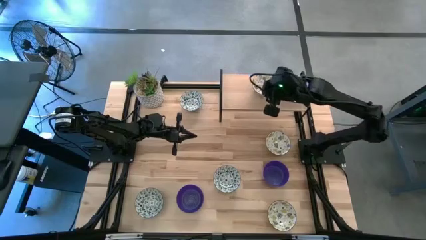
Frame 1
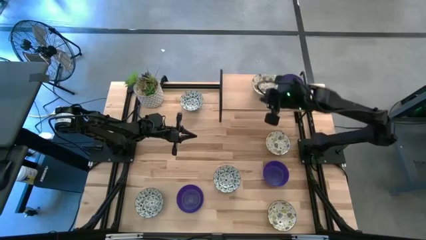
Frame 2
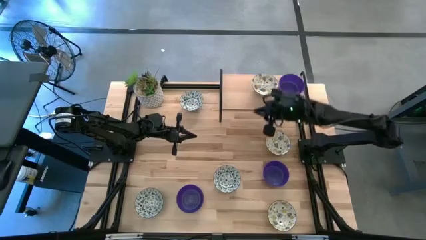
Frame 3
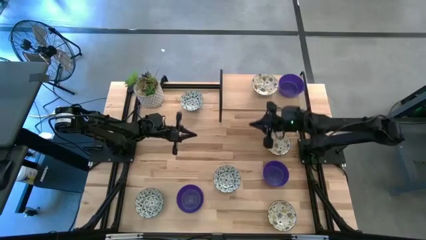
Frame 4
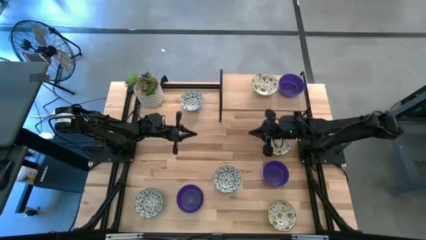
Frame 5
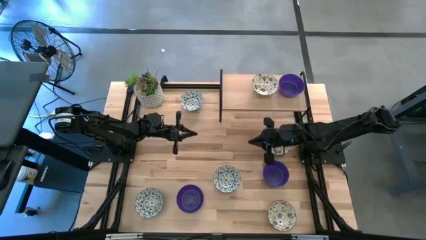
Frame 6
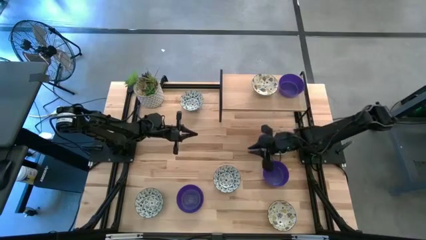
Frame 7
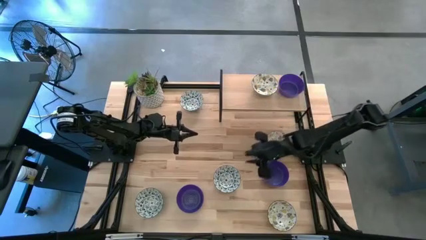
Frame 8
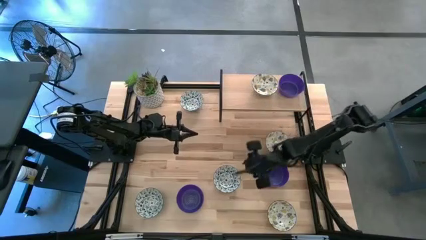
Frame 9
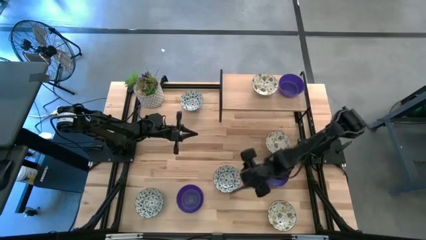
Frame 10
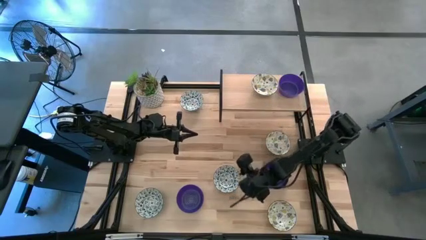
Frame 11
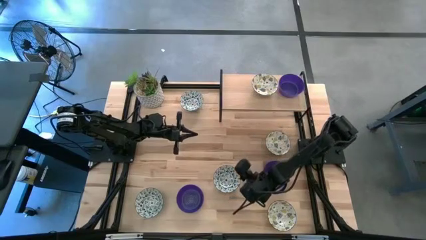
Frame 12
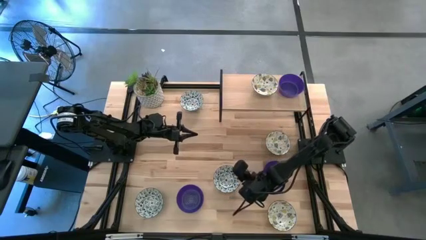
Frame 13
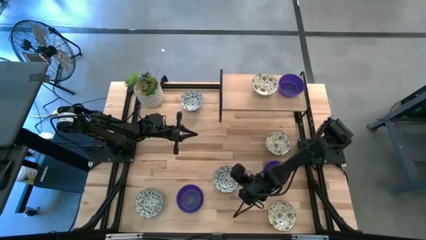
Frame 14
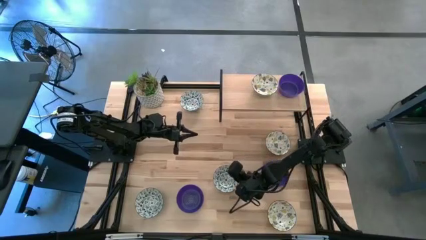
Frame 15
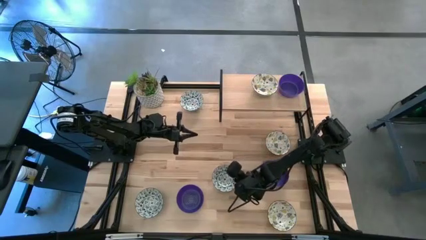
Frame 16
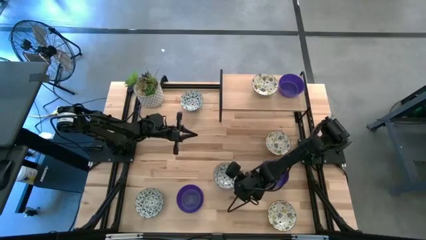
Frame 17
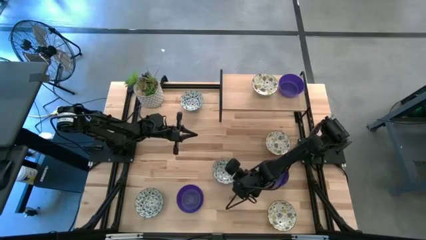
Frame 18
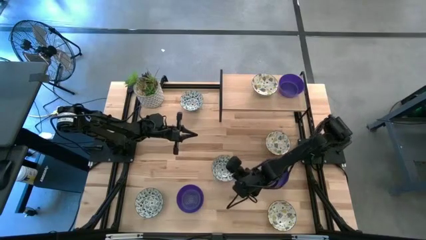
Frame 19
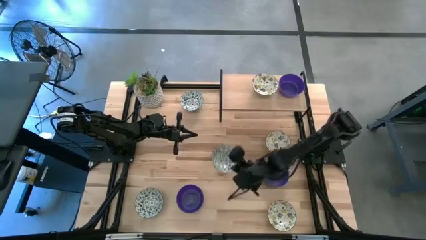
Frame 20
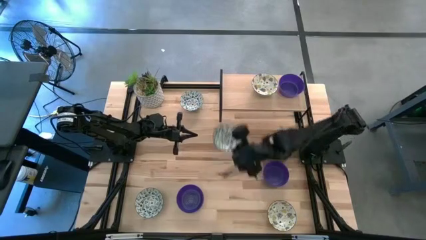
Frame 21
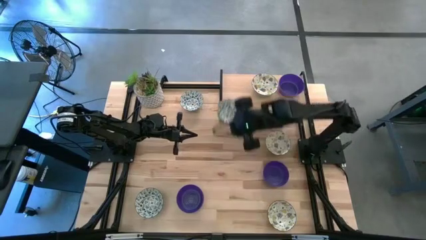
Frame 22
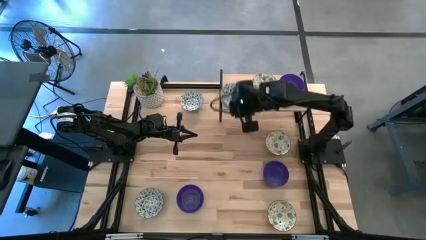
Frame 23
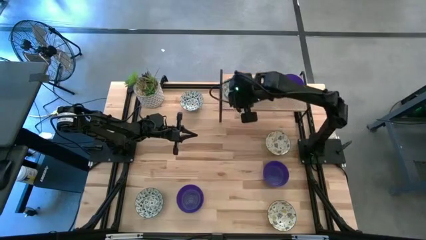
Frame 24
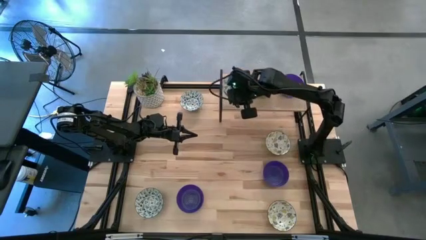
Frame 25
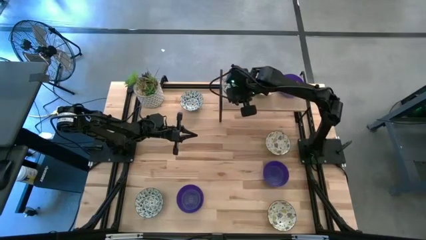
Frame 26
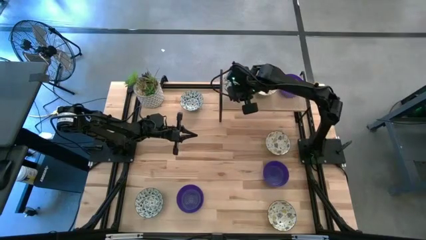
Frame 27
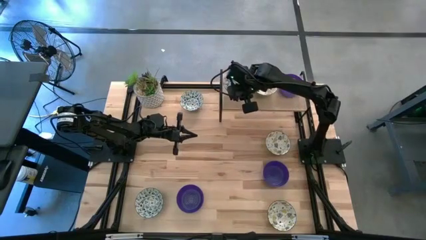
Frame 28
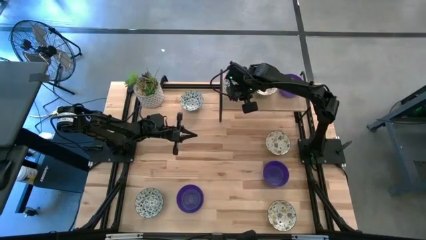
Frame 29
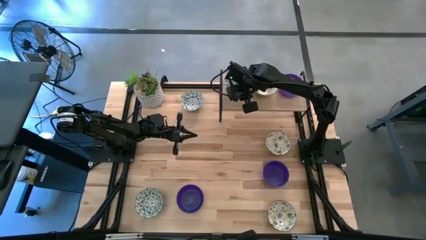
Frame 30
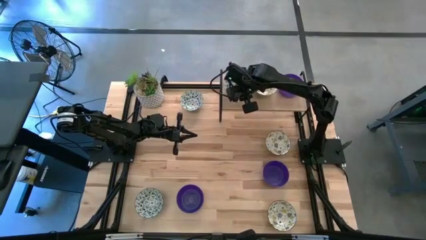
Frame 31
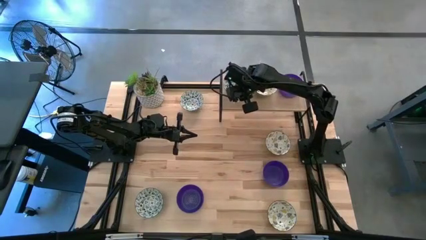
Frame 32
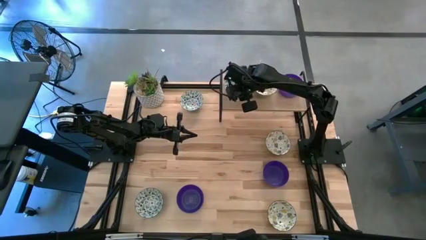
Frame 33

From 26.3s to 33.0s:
Task: Pick & Place Mini bowls
Put the bottom right blue patterned bowl on the shelf

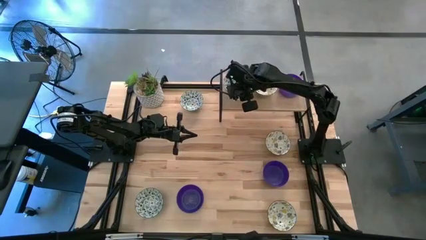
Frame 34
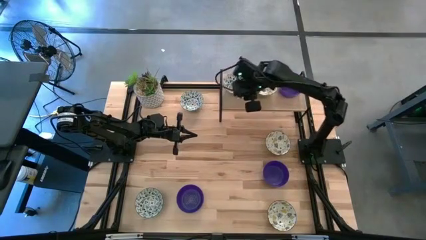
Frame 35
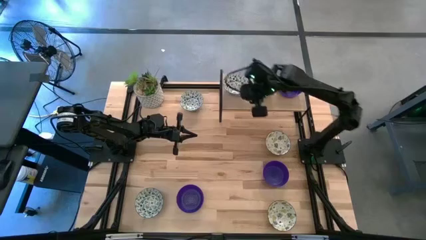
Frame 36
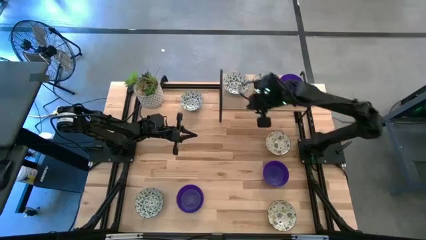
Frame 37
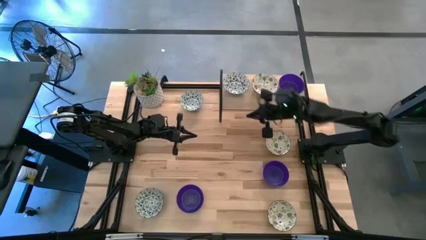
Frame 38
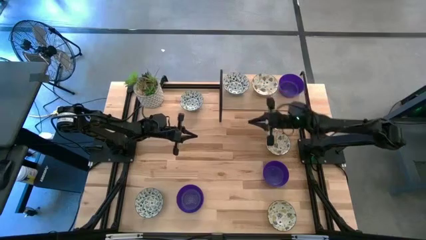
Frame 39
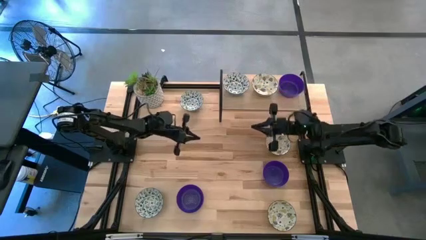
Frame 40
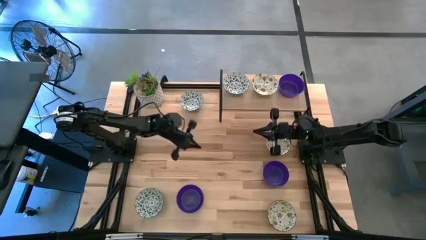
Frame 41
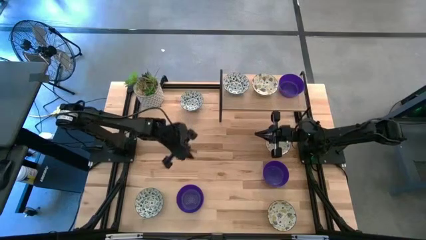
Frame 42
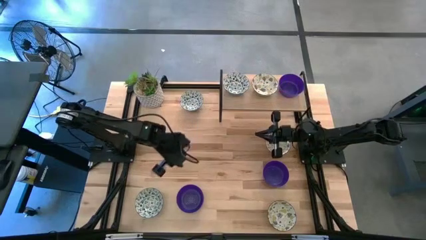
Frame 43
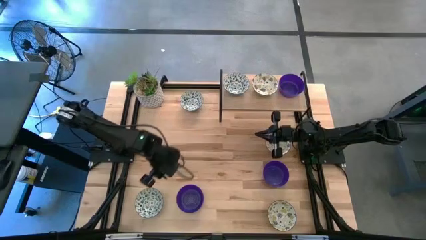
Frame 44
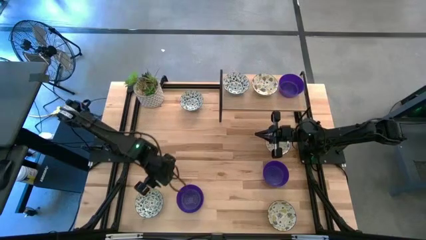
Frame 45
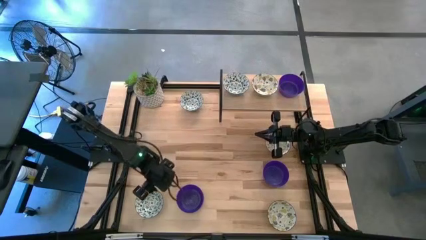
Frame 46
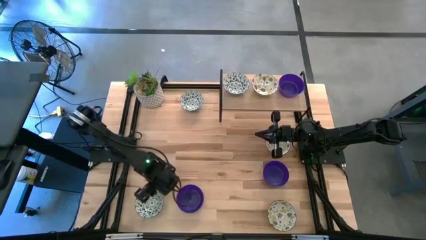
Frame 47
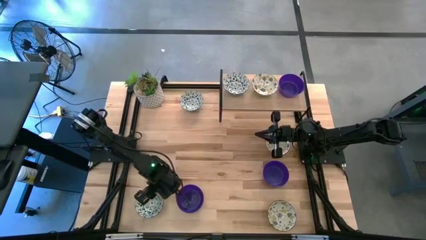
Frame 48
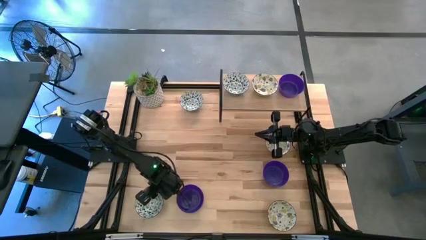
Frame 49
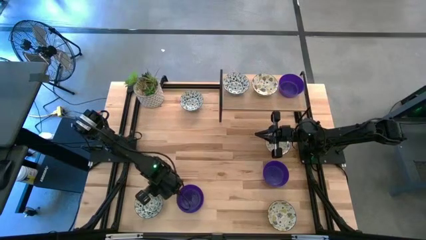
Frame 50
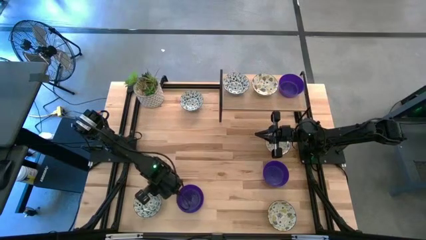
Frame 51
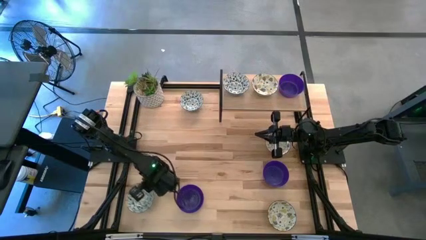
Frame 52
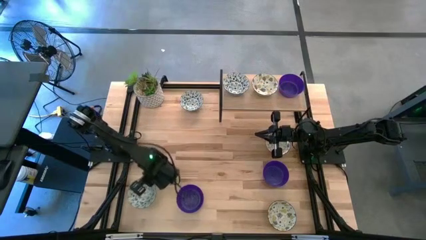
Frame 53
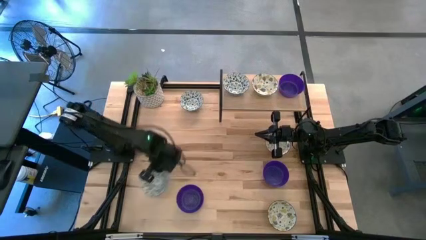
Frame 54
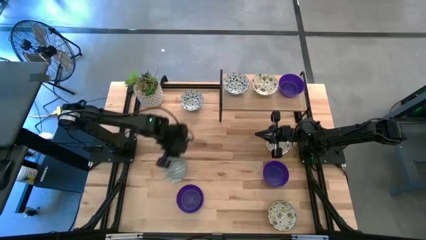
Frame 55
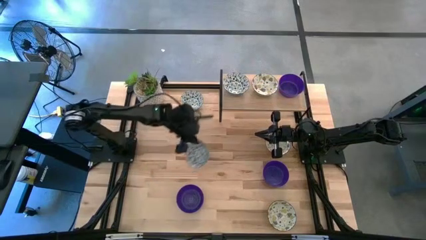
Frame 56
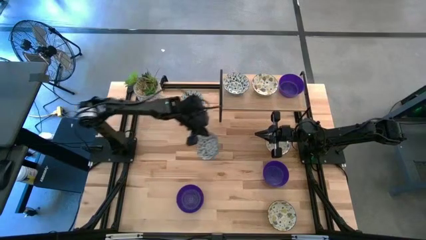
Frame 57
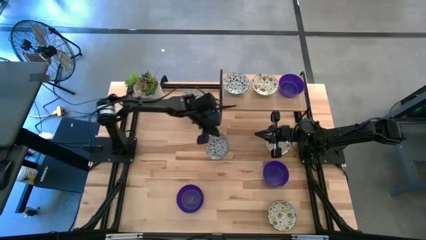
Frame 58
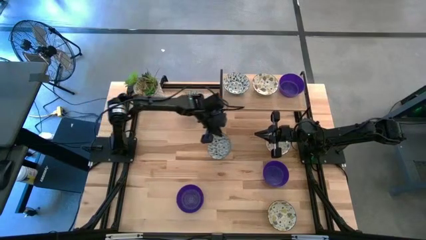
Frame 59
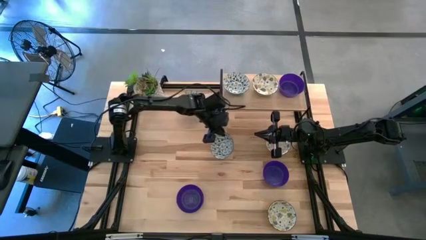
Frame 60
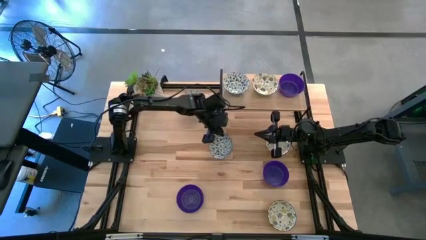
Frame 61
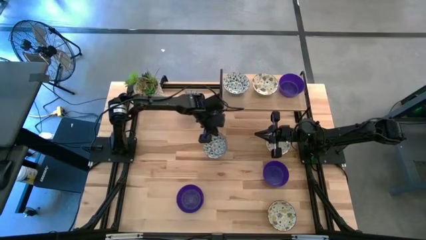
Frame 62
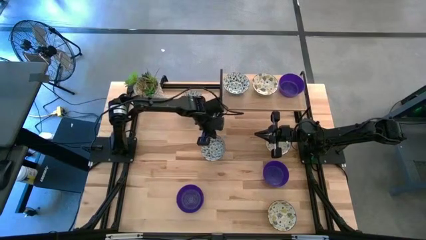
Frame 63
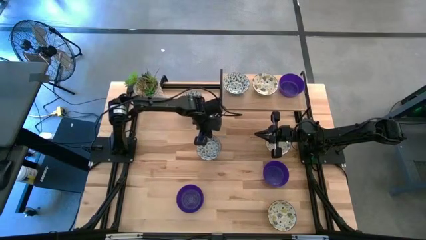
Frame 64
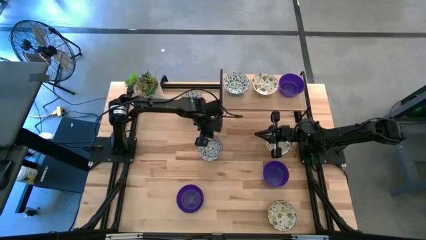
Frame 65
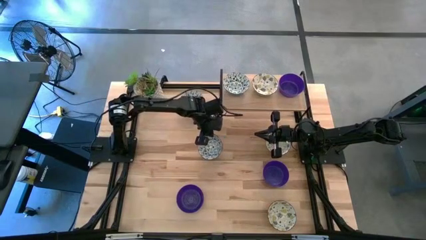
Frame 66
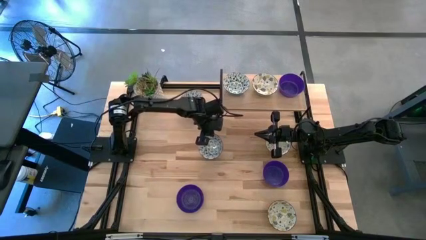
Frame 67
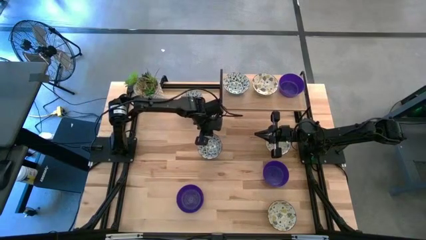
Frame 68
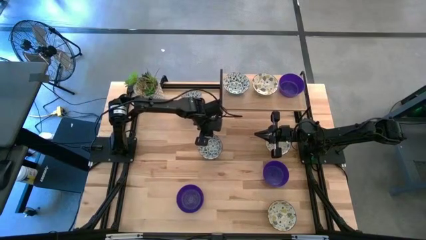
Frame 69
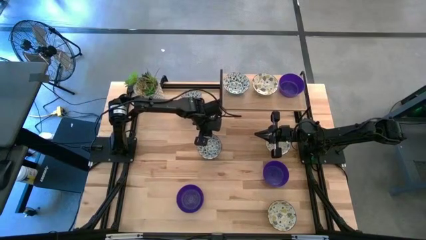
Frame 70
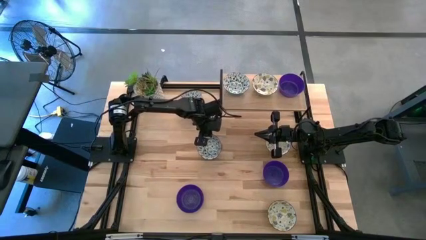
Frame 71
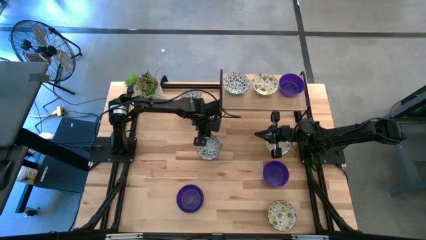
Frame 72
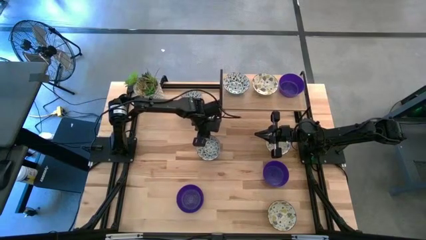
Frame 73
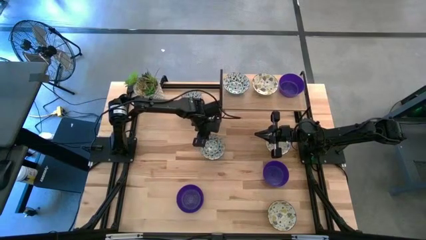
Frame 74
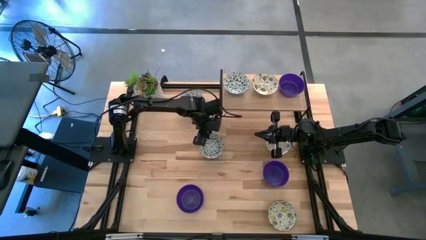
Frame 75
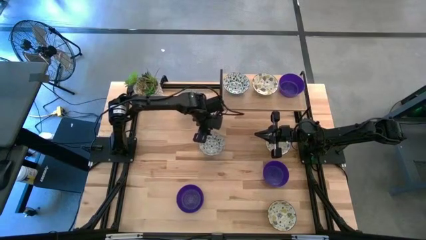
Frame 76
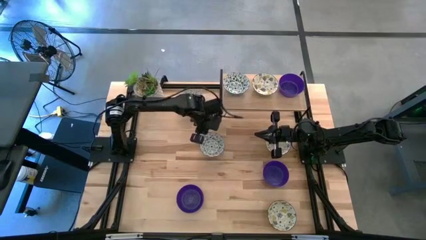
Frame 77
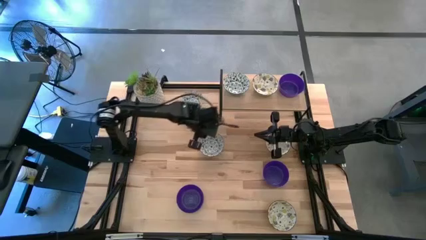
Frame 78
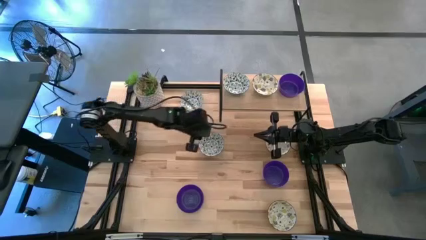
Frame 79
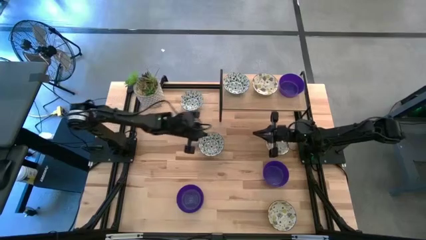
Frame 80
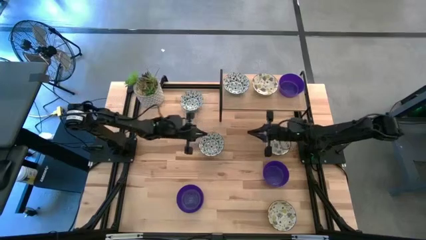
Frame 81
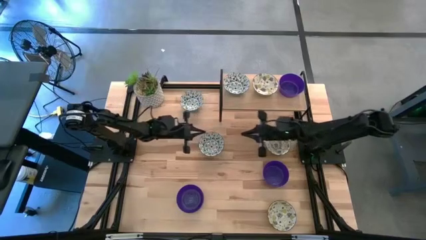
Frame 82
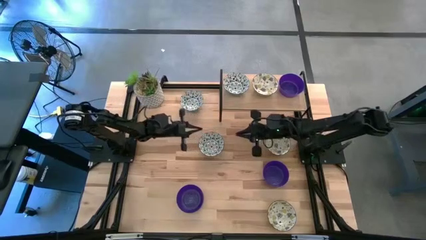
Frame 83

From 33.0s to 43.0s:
Stack the bottom blue patterned bowl on the blue patterned bowl on the shelf
